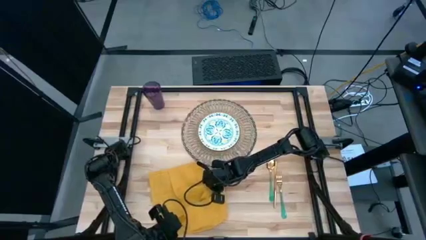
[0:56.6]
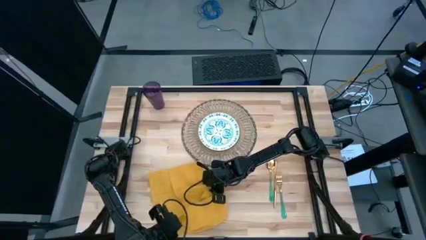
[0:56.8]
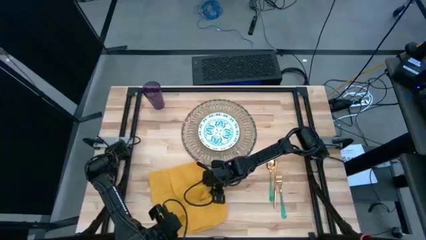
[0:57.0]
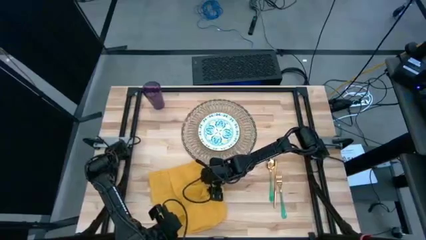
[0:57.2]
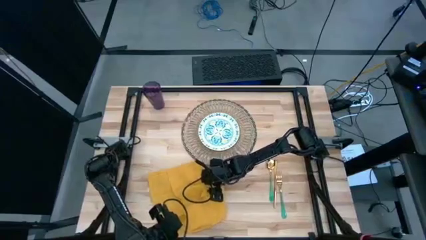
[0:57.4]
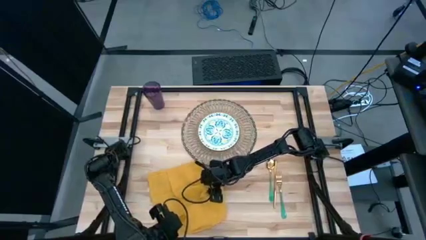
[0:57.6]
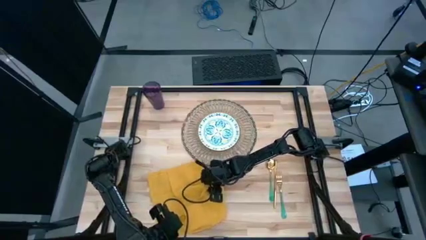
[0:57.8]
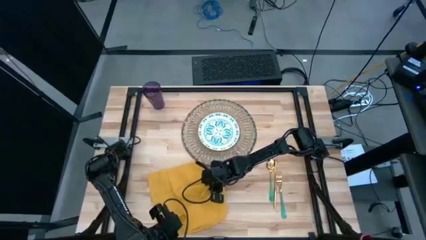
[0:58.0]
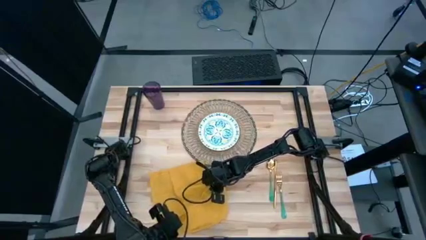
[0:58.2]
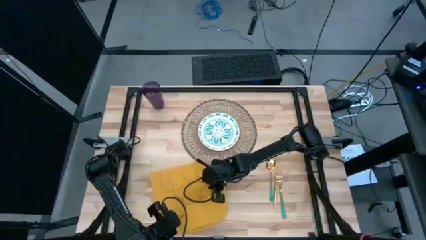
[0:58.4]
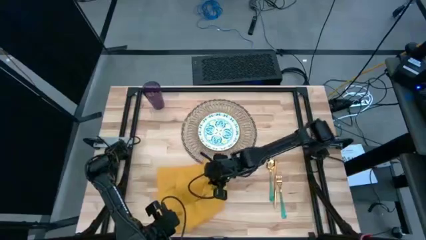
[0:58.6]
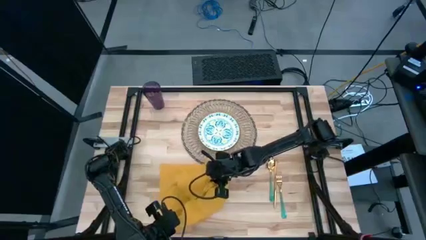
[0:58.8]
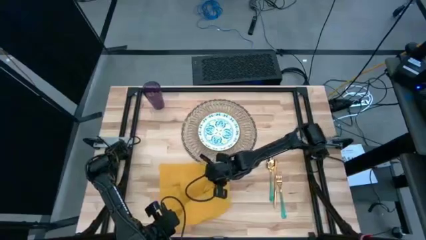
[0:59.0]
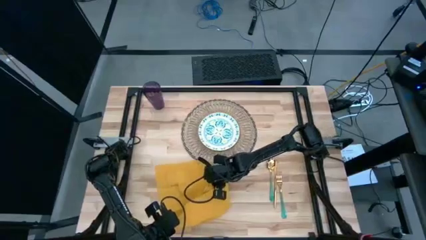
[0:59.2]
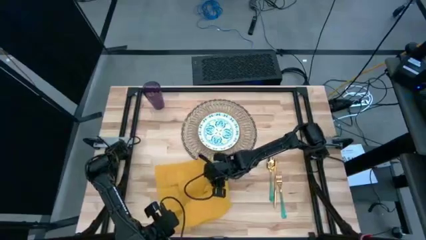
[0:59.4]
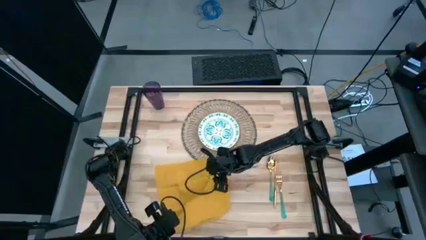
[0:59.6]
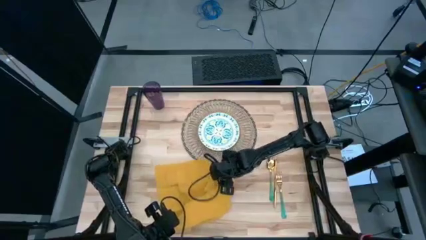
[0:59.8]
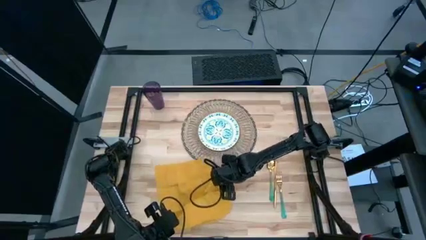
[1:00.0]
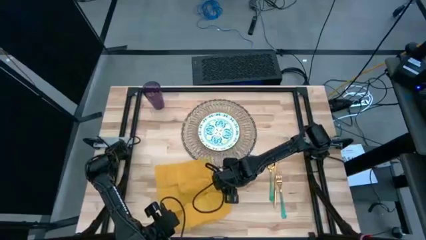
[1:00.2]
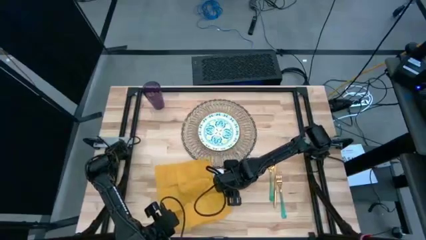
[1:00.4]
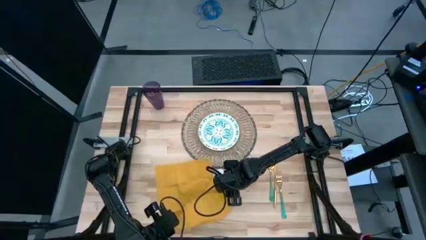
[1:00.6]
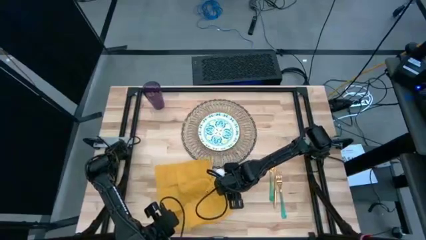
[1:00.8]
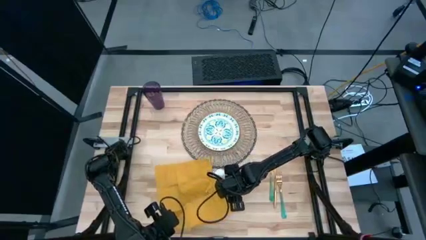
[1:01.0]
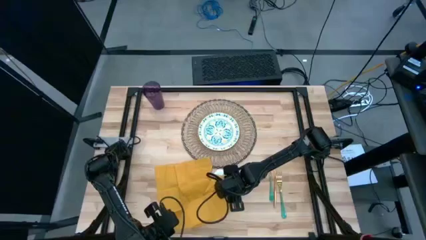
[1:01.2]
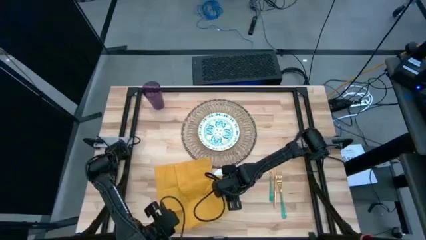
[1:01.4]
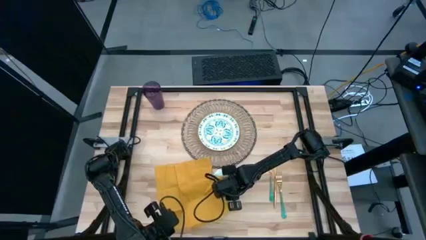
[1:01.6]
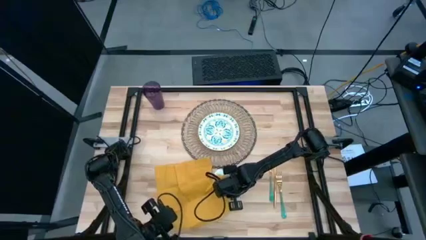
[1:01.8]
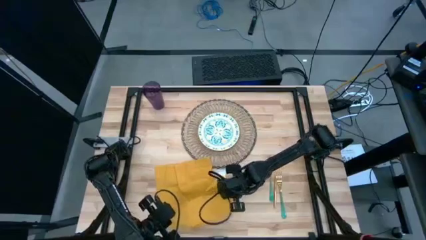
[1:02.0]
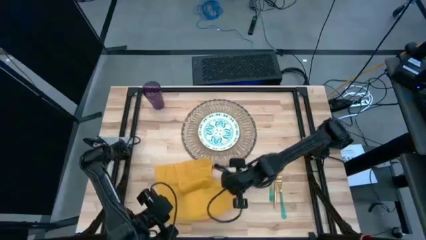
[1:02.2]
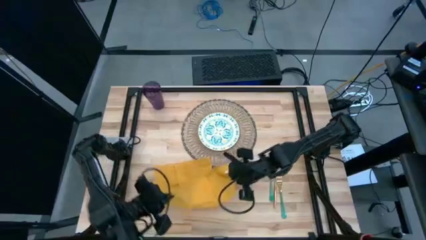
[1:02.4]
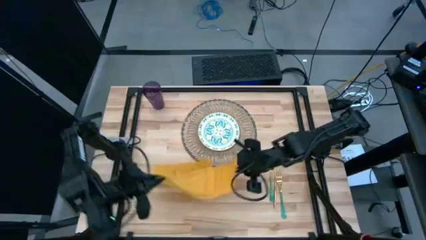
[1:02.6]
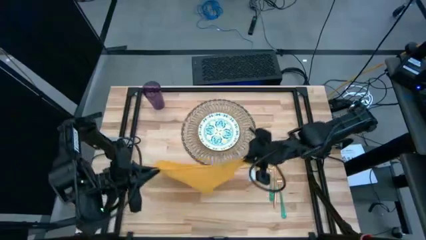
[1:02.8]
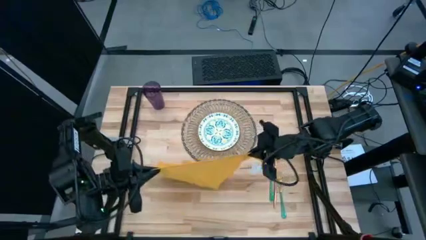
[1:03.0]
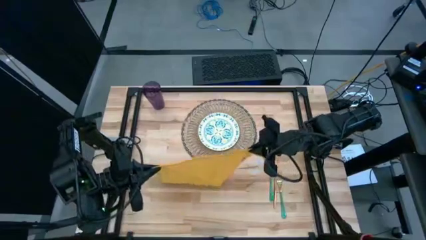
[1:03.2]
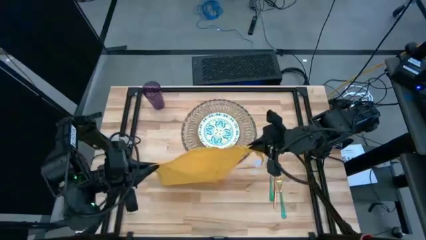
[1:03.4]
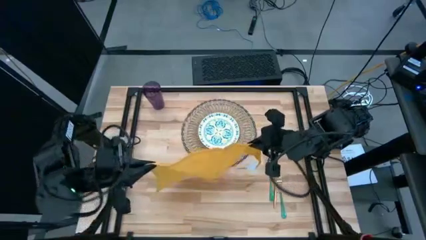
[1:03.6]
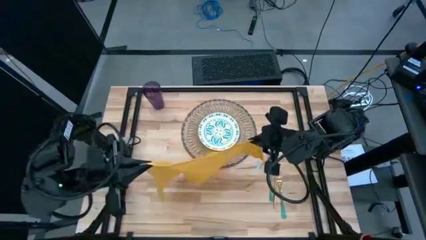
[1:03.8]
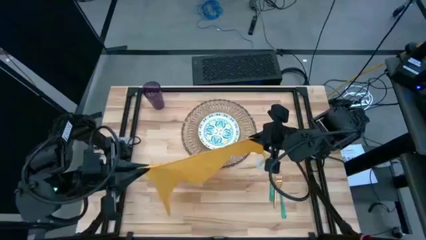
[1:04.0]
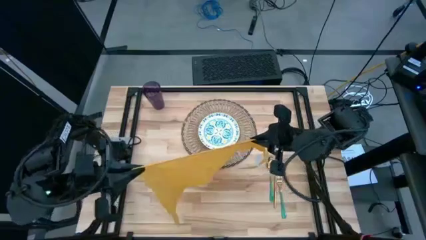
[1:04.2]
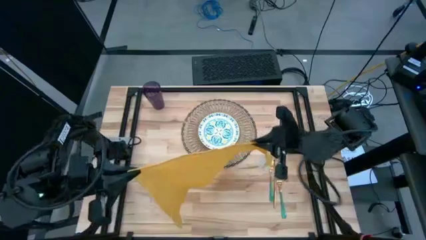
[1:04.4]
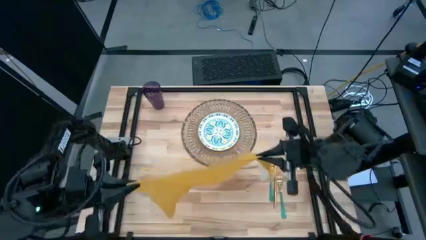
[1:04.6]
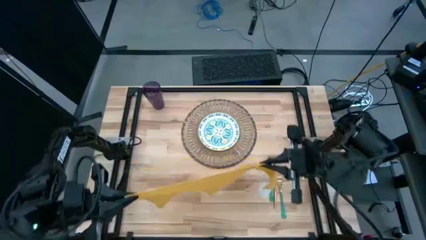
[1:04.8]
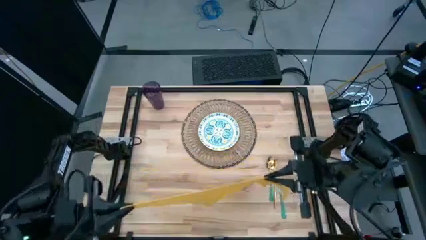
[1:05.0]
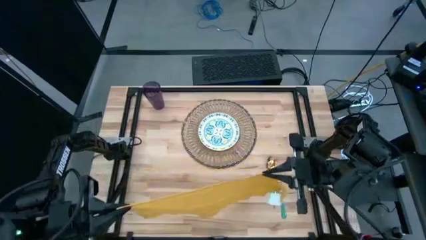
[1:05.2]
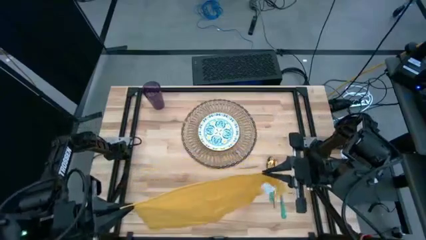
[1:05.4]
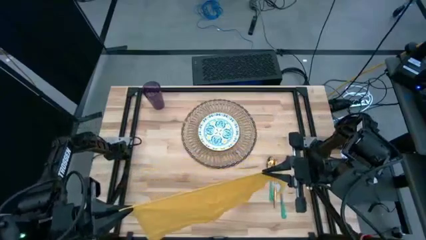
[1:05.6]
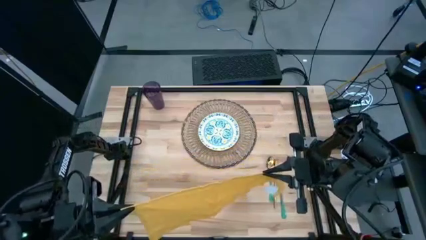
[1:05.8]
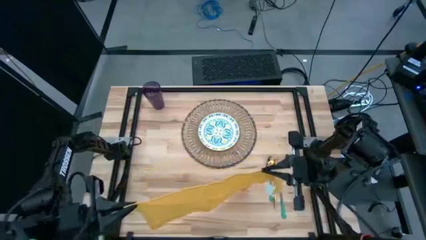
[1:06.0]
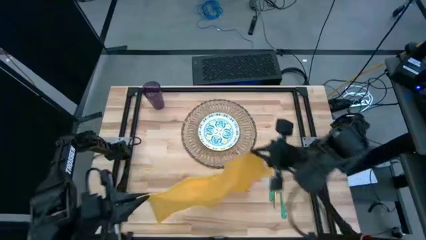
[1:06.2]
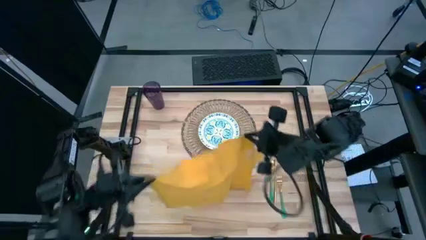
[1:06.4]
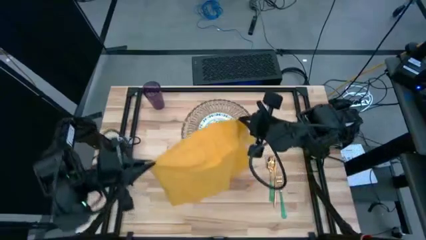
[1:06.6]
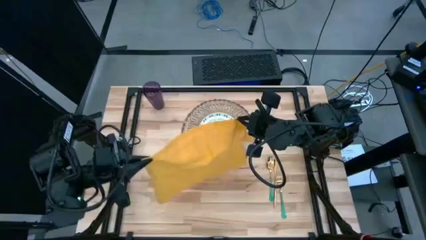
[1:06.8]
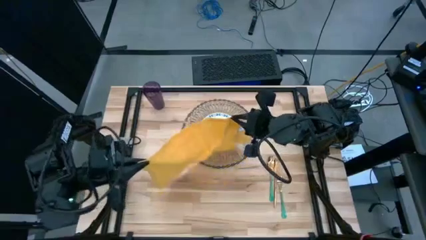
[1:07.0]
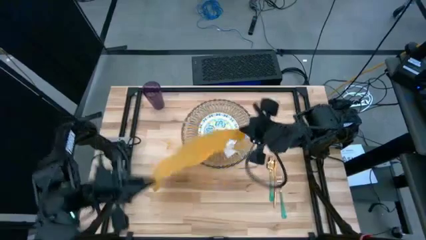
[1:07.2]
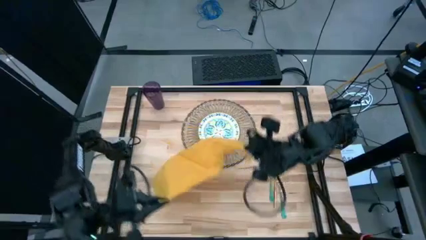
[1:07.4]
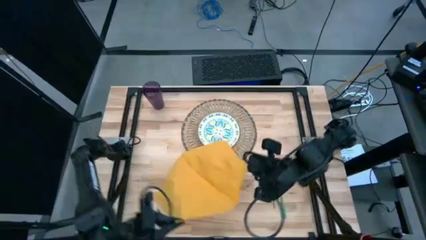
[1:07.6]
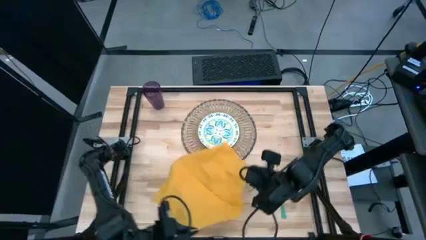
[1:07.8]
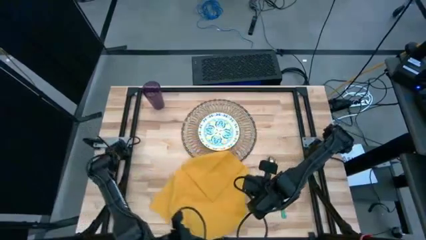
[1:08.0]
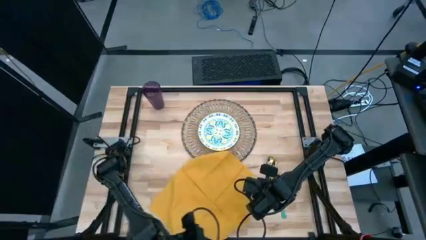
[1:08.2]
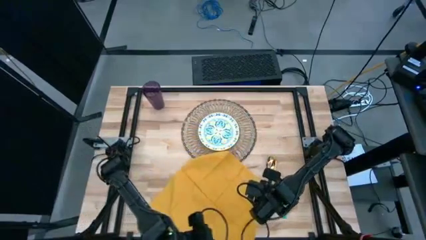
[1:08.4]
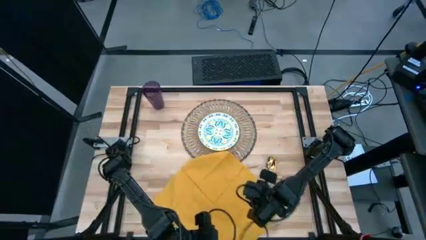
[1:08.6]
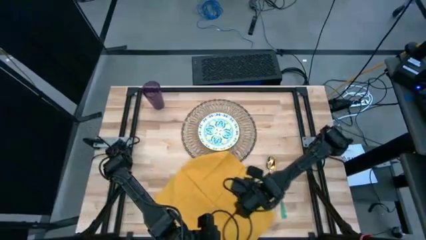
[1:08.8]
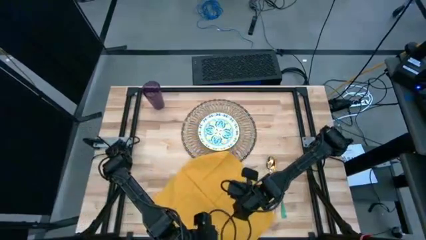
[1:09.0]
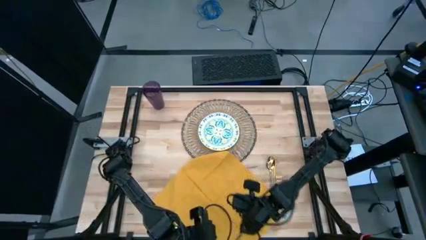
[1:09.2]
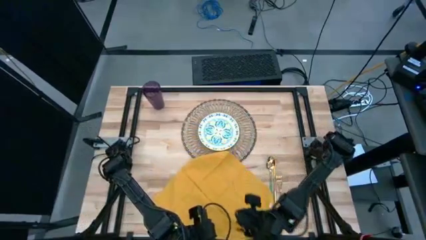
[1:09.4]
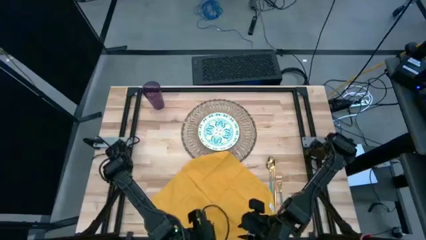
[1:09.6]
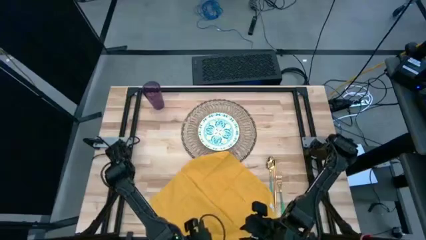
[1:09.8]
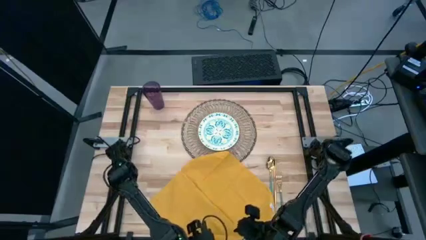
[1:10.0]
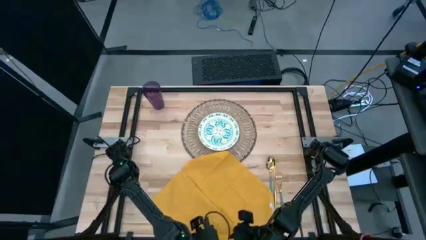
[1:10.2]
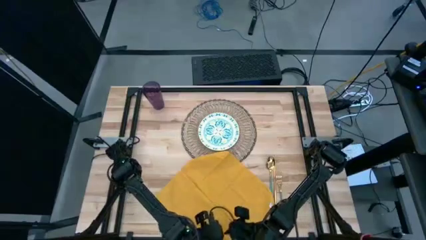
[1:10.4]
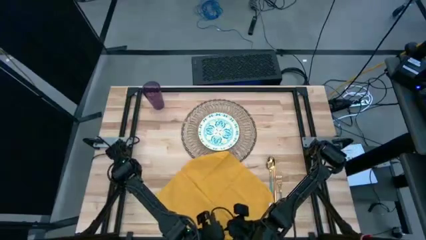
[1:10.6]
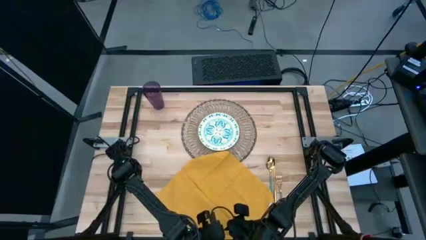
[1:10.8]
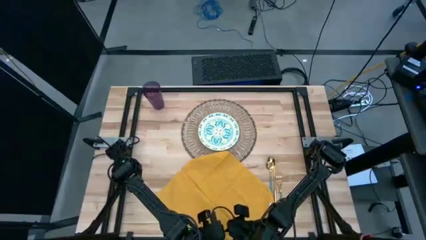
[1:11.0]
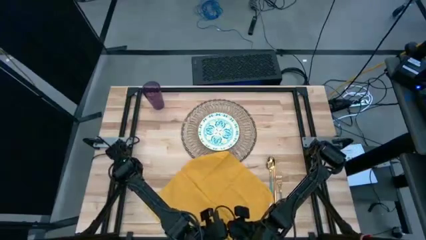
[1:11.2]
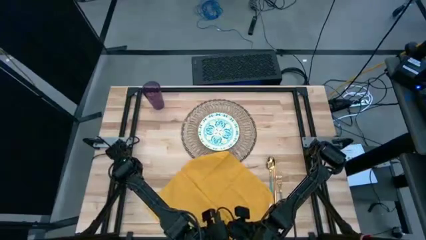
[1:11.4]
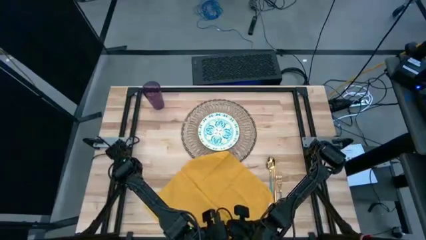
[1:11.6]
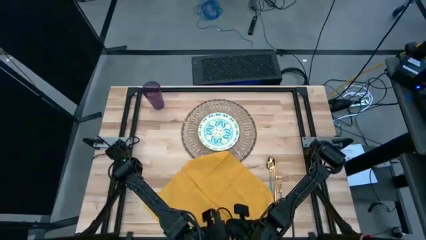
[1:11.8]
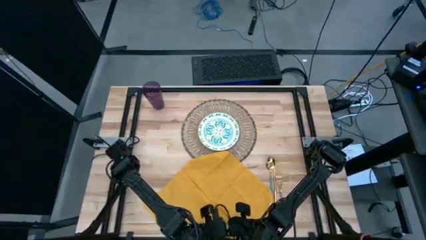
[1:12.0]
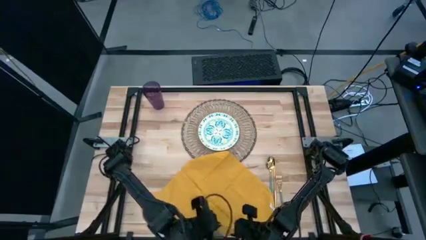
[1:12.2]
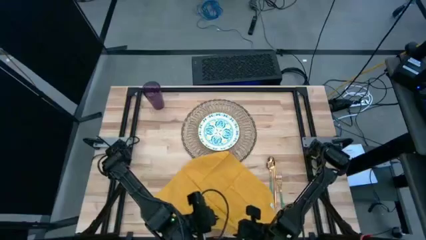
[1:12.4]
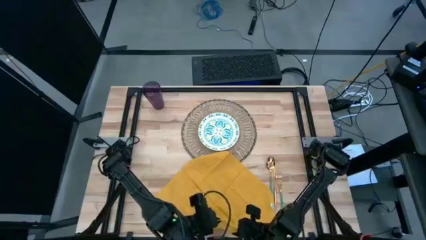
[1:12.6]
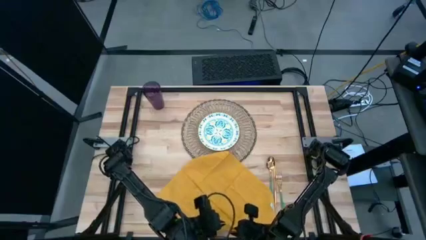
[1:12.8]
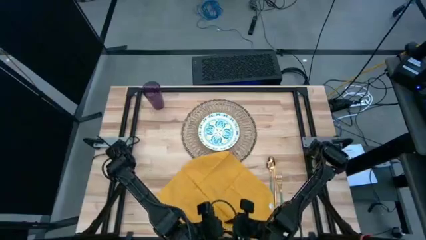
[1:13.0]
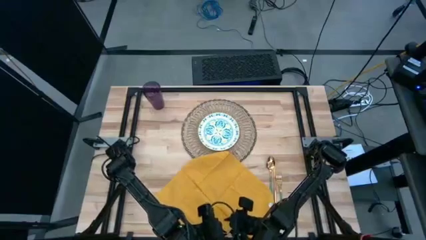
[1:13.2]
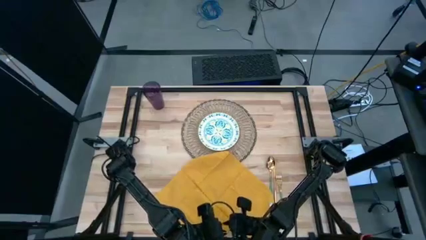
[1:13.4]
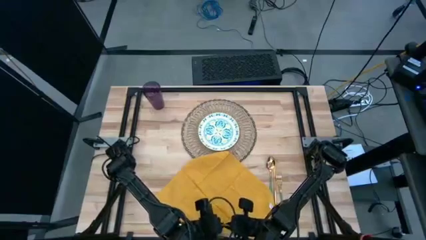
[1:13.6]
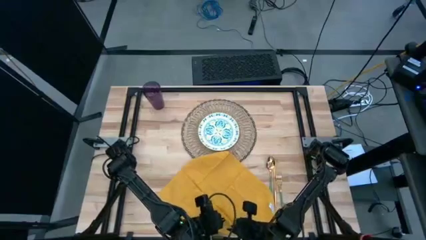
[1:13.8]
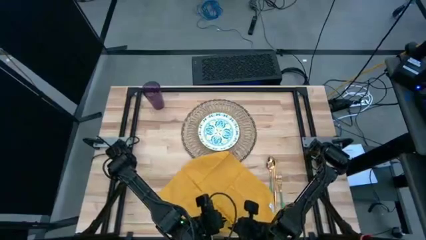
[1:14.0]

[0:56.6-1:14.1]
Task: Set table place
Fold the yellow table napkin
